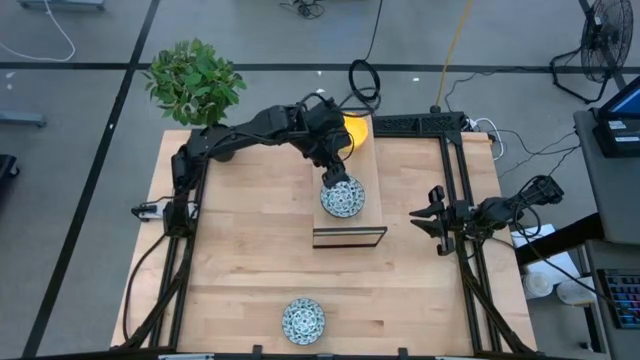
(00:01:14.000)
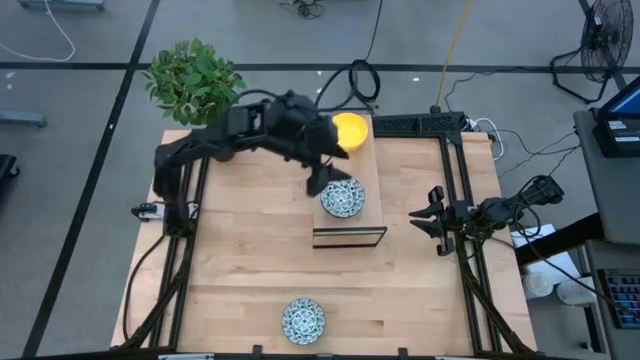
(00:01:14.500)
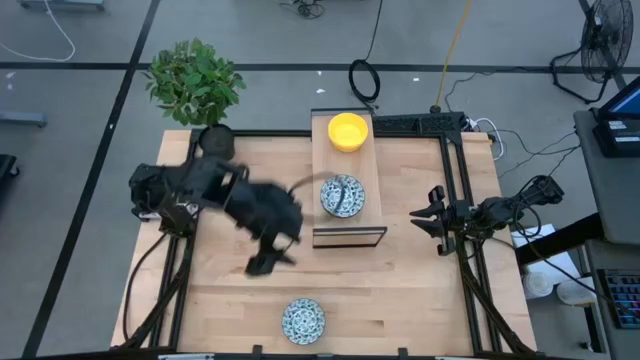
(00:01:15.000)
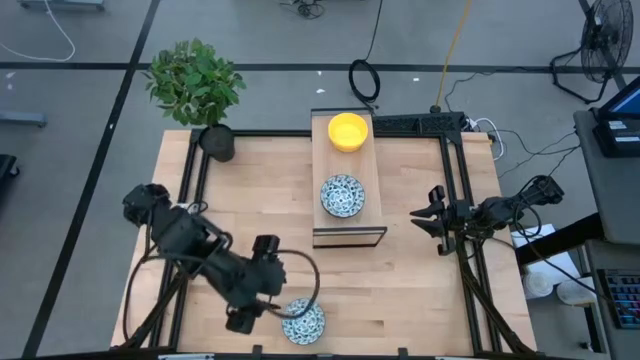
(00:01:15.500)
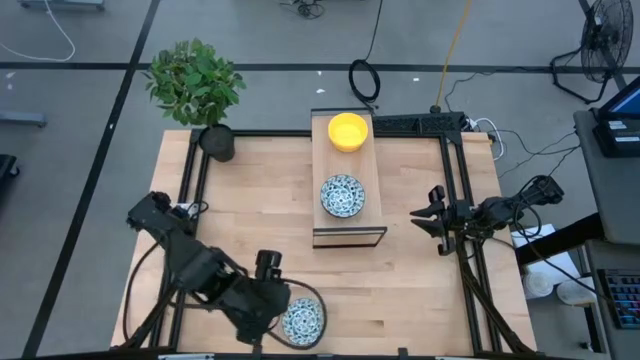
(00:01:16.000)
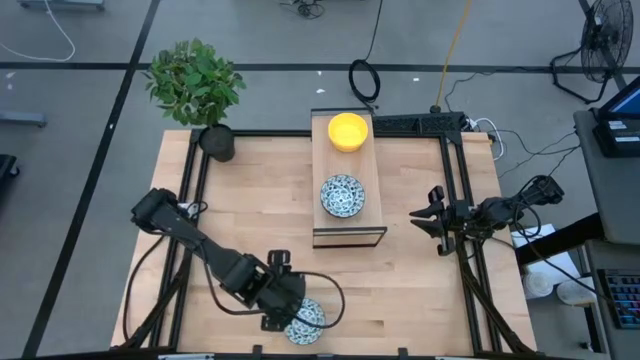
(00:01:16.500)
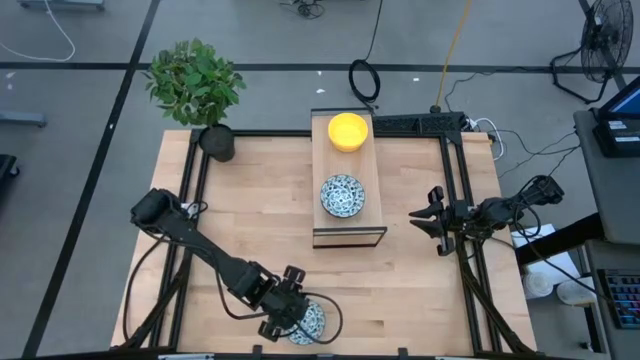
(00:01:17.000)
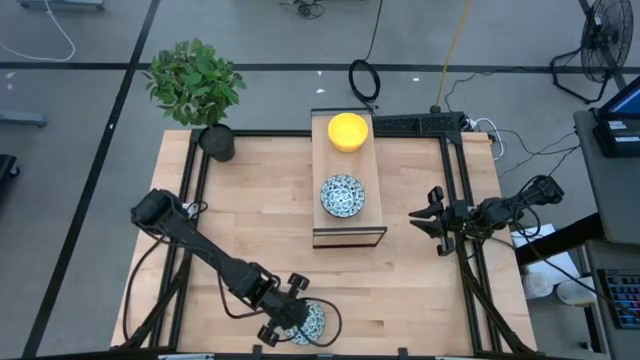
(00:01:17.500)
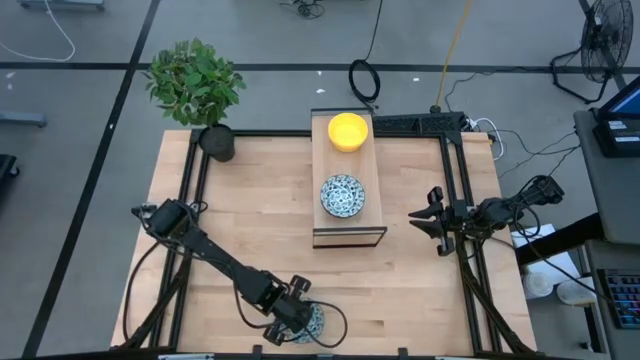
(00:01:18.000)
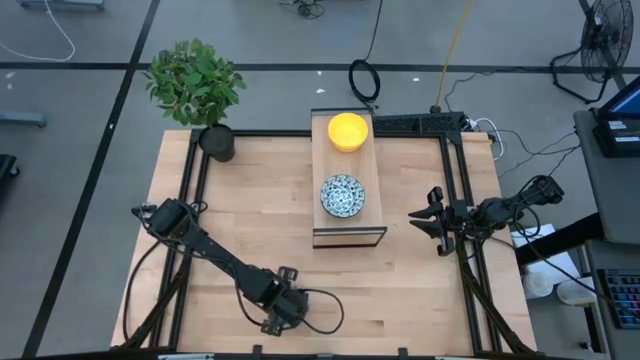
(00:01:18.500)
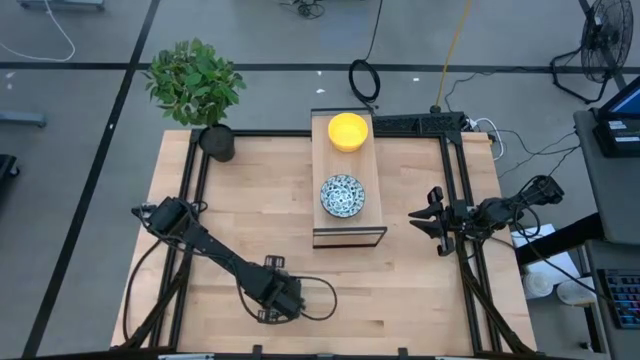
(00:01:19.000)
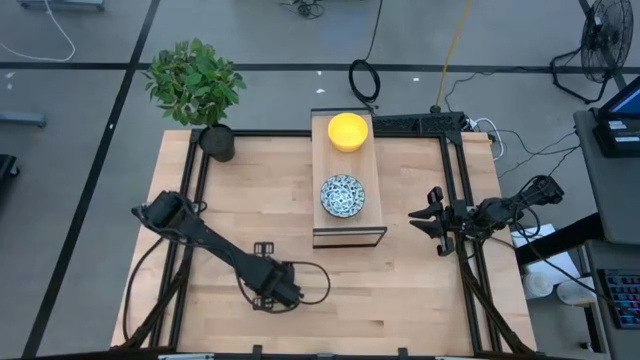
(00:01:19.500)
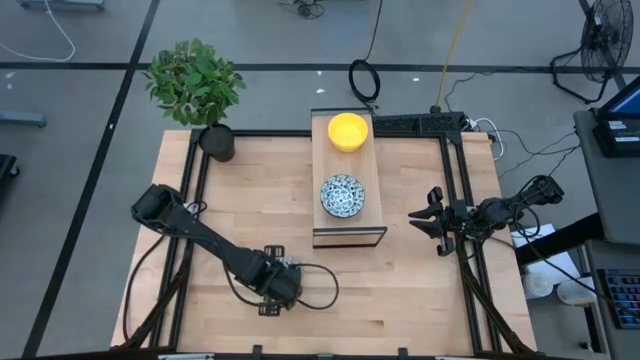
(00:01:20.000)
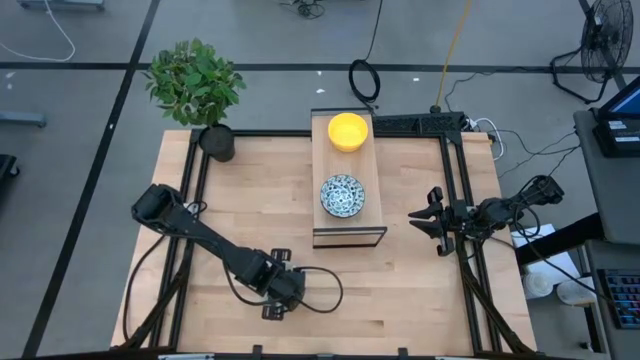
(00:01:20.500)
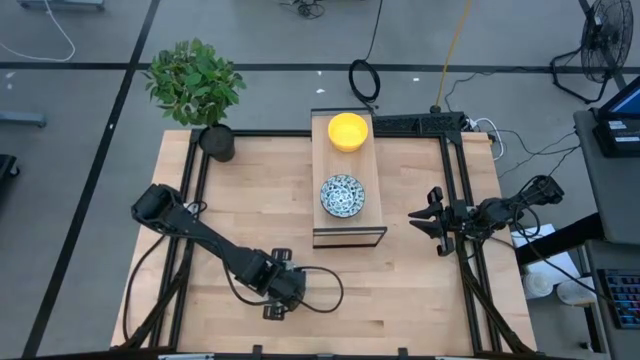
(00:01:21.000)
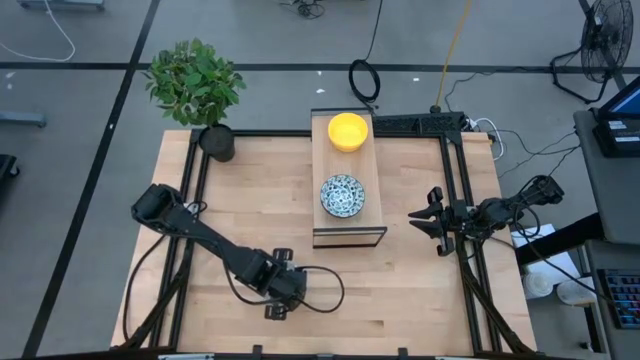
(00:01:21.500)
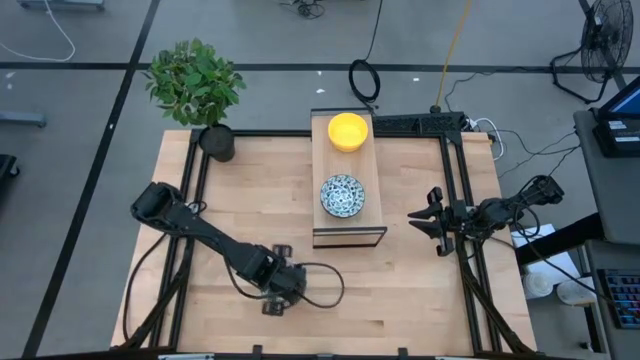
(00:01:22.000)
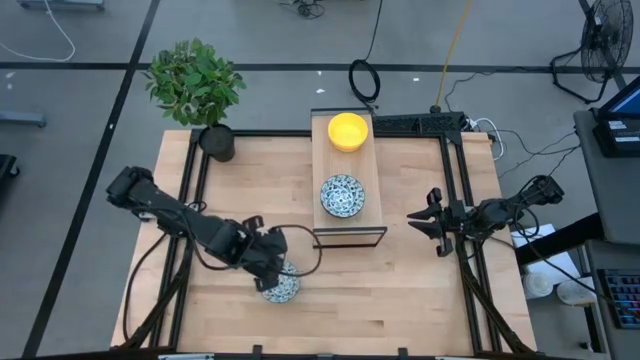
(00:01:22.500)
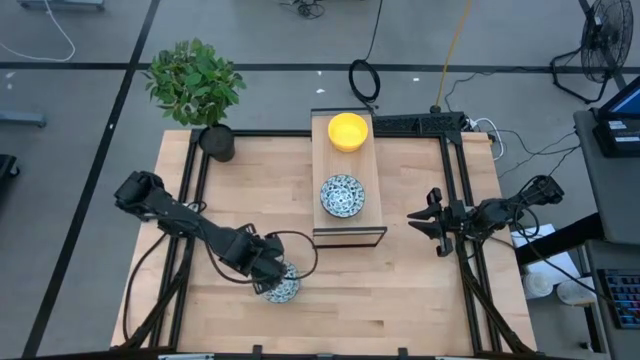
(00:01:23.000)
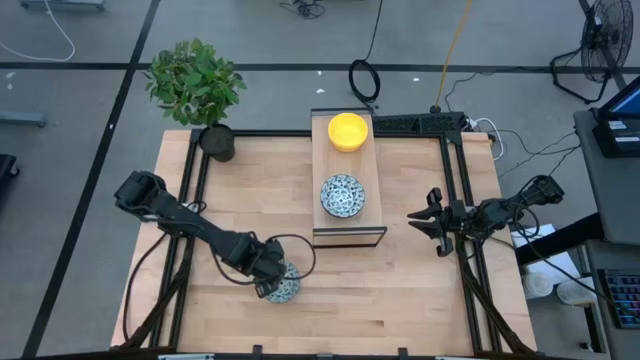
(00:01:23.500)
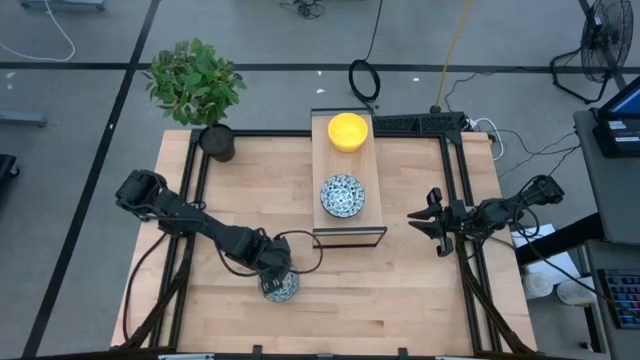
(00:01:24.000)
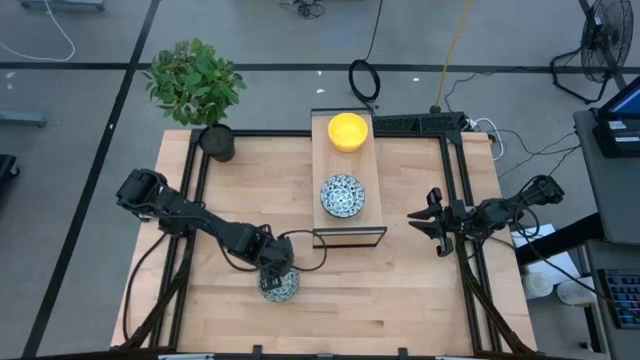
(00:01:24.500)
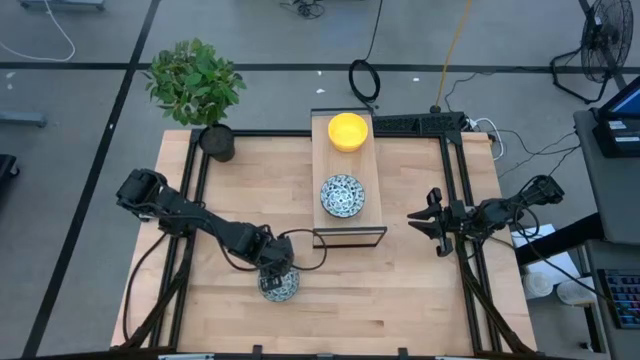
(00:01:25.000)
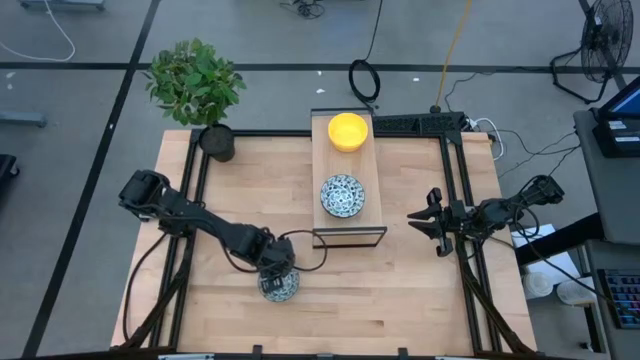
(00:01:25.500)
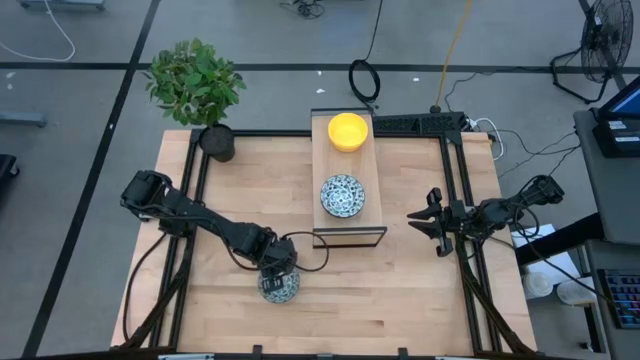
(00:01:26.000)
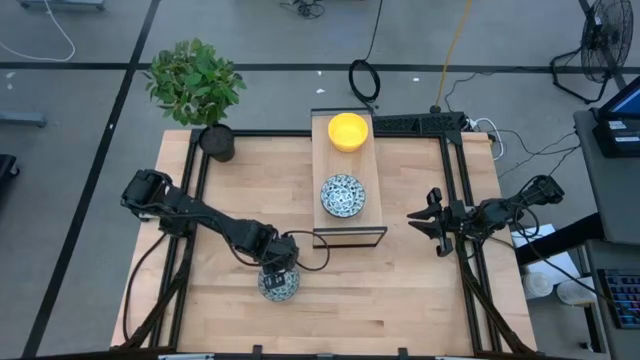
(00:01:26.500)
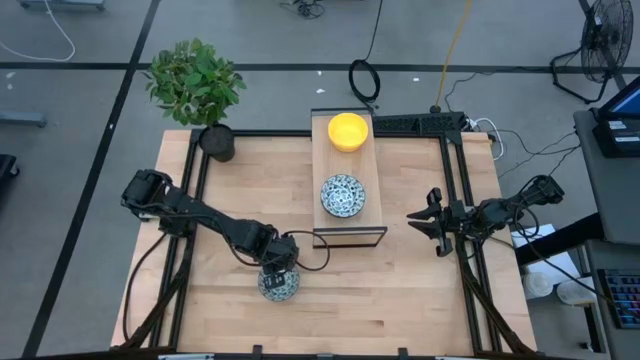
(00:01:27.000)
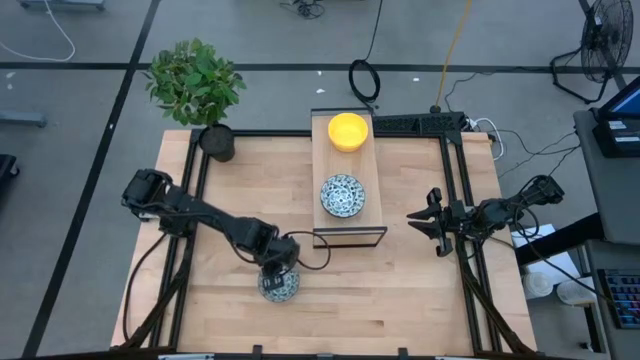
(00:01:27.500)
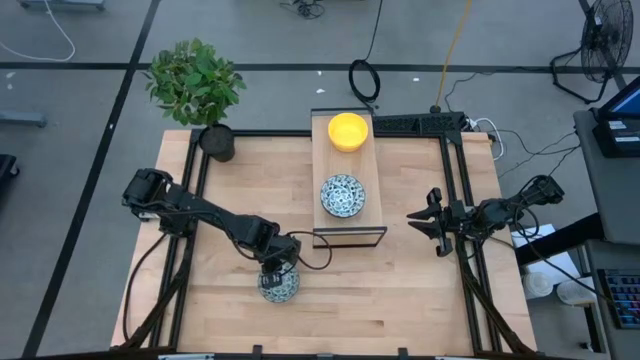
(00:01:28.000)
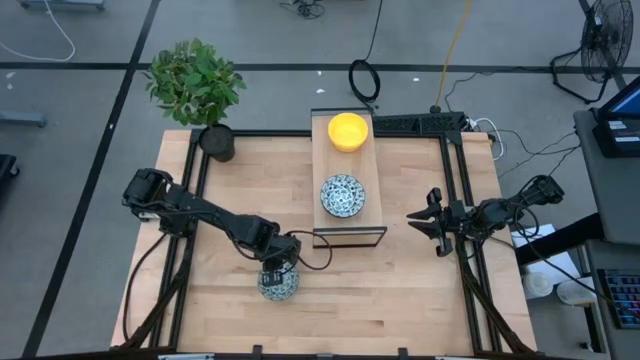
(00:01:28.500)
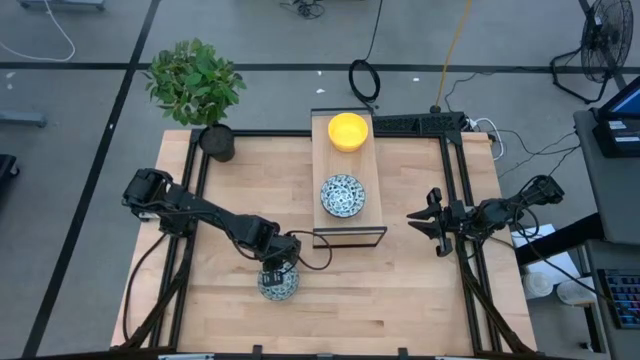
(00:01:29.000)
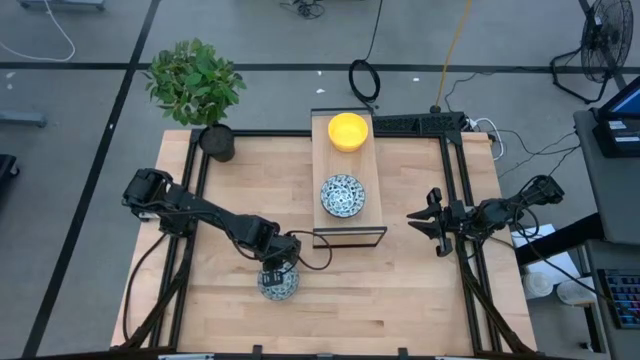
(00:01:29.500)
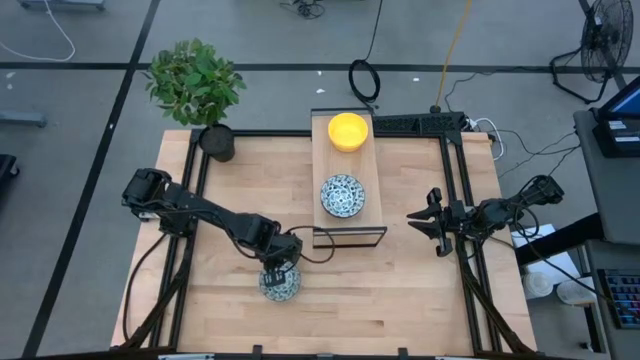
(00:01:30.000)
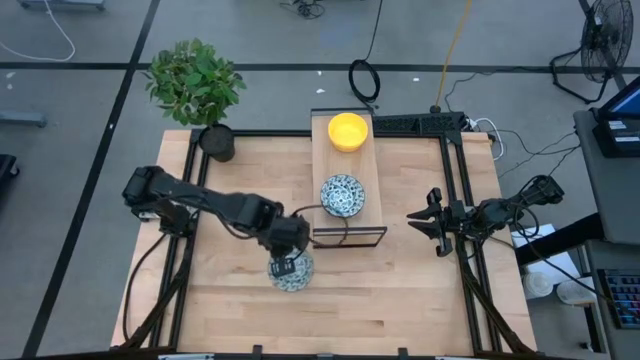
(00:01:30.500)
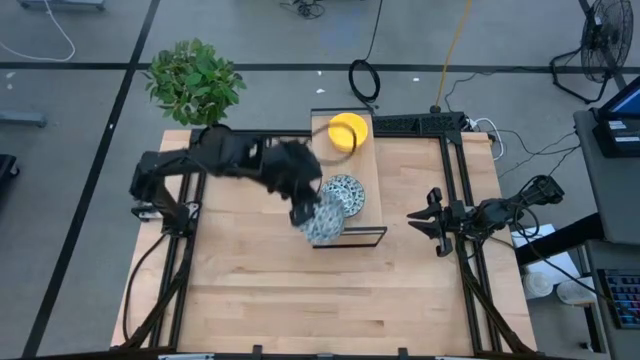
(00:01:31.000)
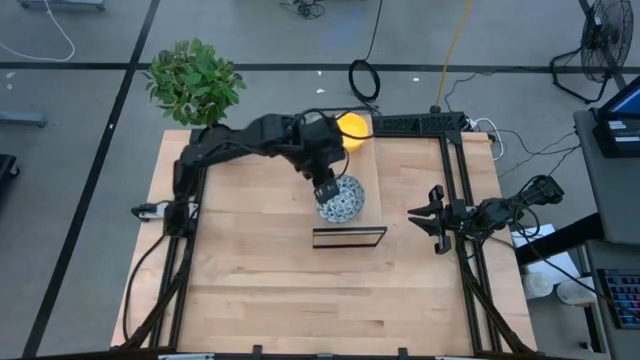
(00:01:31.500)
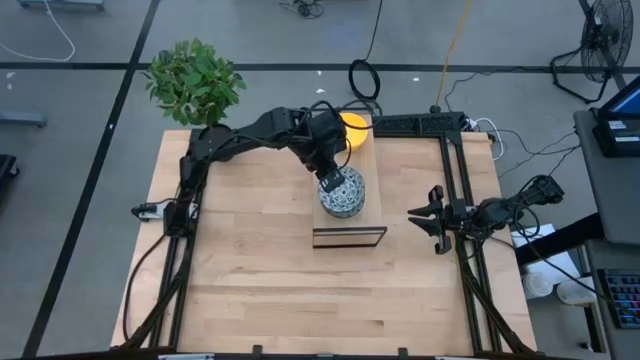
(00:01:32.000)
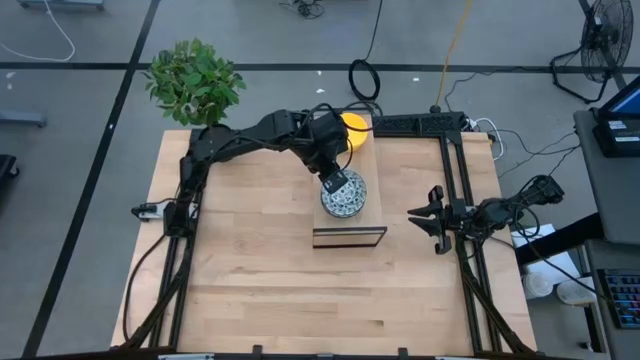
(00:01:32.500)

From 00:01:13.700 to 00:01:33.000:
Task: Pick & Place Mini bowls
Stack the blue patterned bowl on top of the blue patterned bowl on the shelf

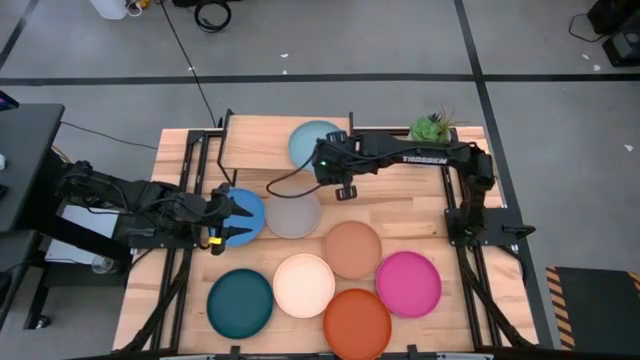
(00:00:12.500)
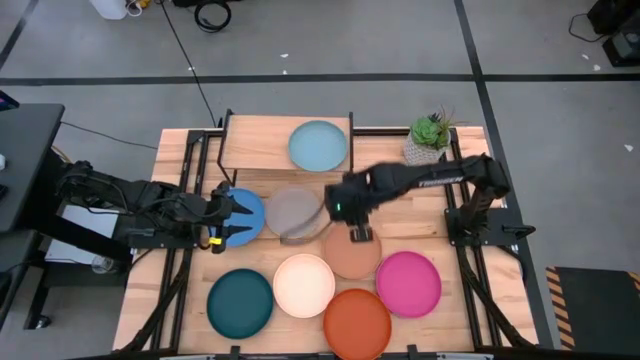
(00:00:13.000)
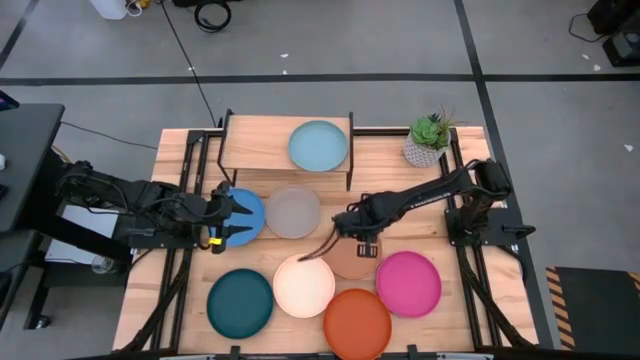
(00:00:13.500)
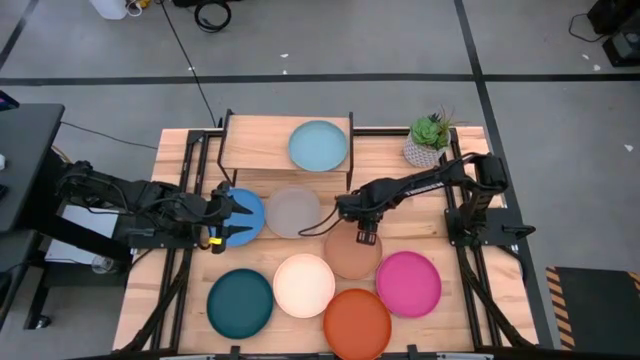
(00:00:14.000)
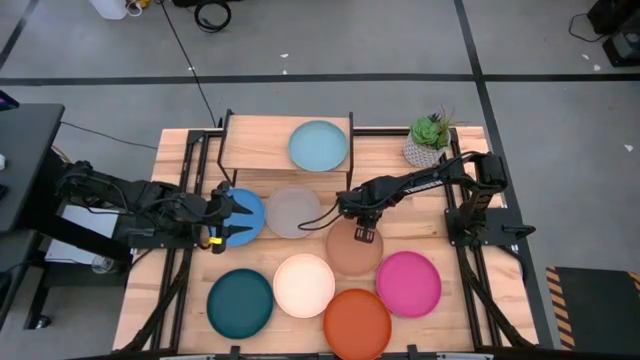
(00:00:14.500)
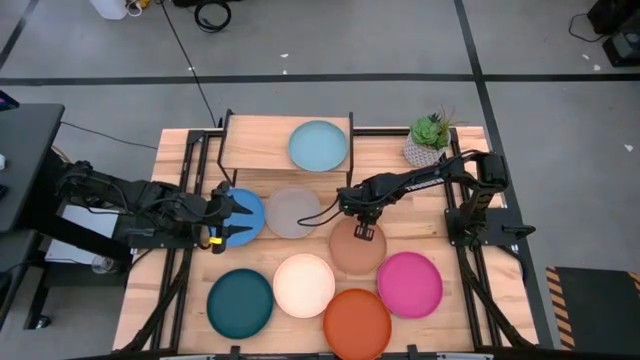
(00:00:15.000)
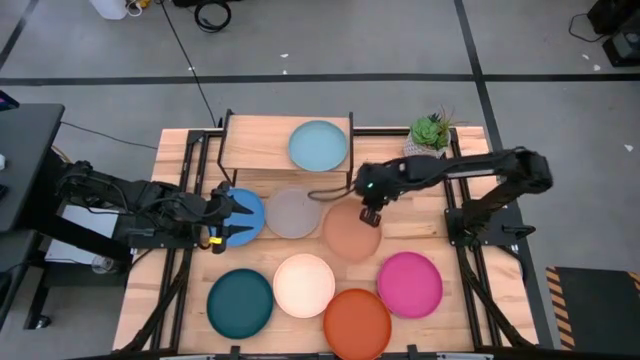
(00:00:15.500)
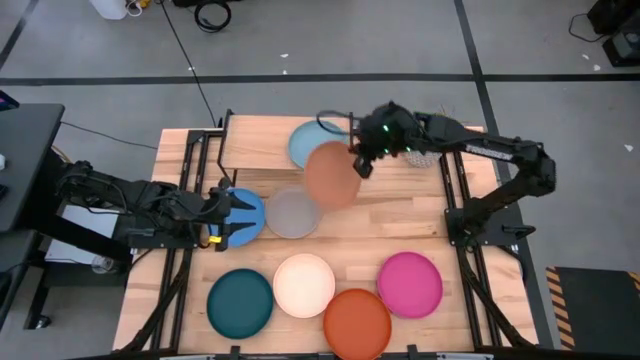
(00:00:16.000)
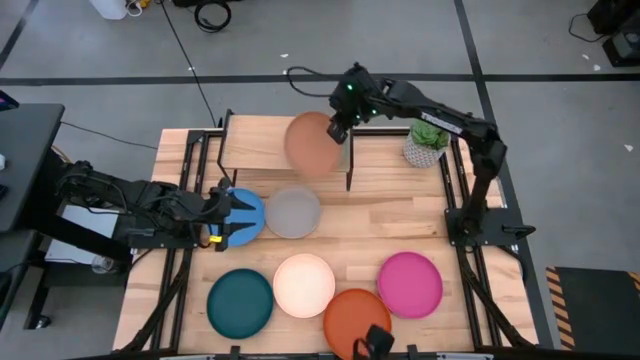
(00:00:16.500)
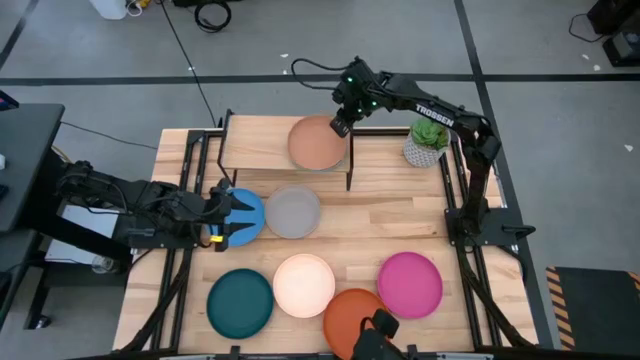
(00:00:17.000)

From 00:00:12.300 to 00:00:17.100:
Task: Place and stack plates onto a shelf
Stack the brown plate on top of the light blue plate on the shelf
